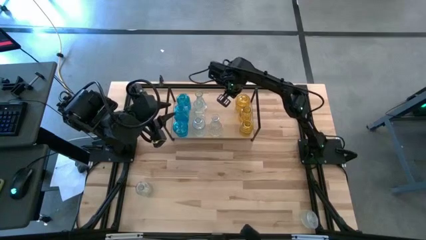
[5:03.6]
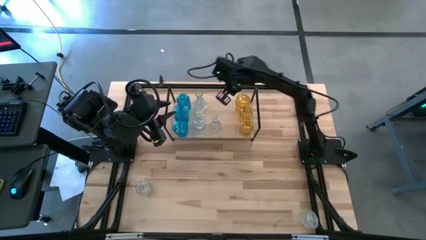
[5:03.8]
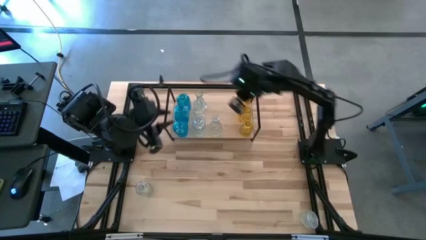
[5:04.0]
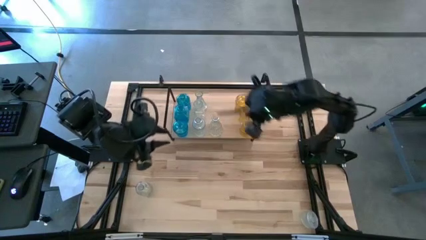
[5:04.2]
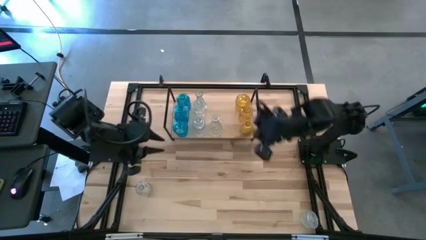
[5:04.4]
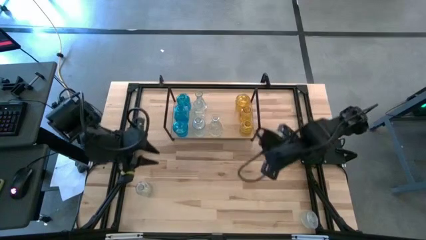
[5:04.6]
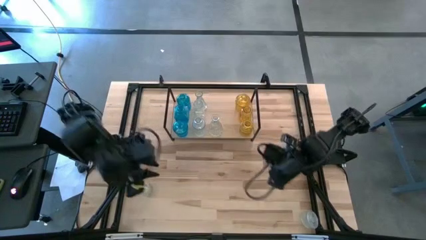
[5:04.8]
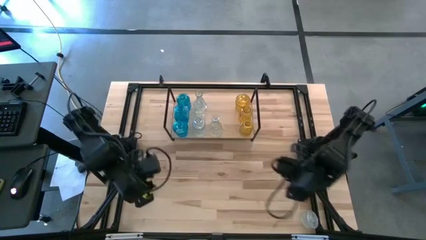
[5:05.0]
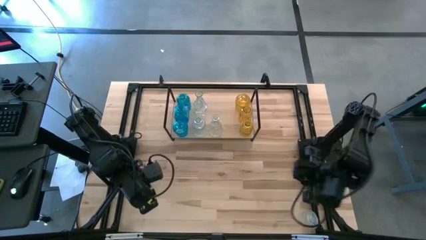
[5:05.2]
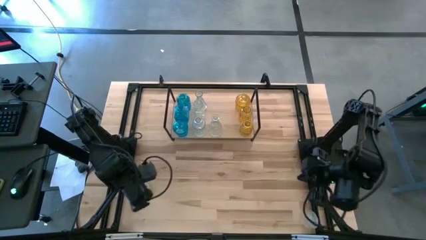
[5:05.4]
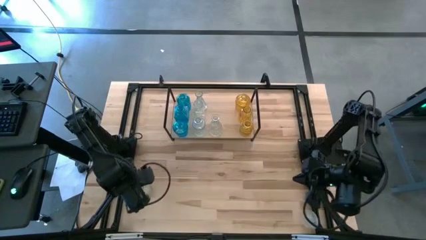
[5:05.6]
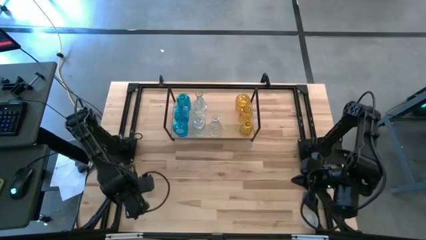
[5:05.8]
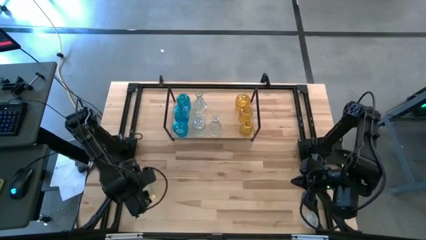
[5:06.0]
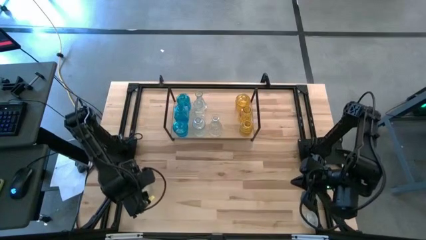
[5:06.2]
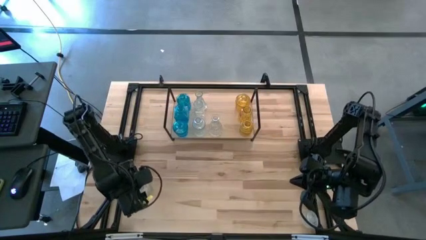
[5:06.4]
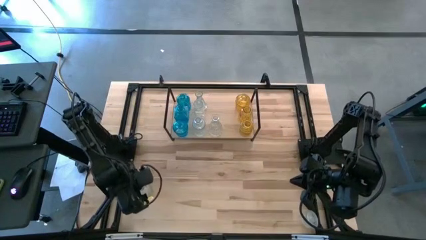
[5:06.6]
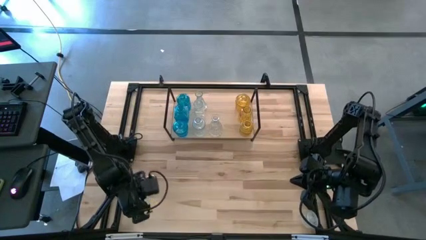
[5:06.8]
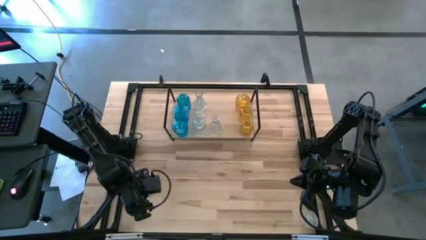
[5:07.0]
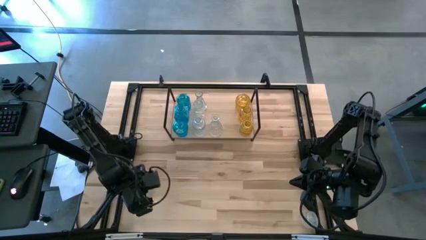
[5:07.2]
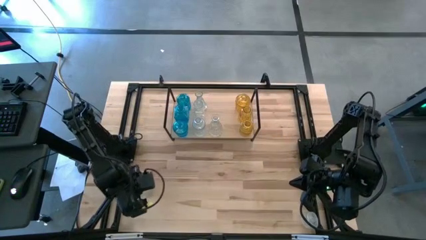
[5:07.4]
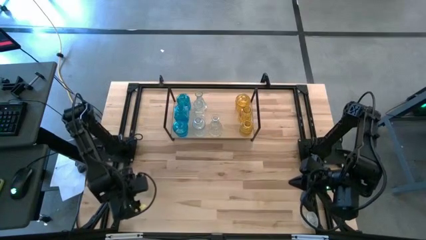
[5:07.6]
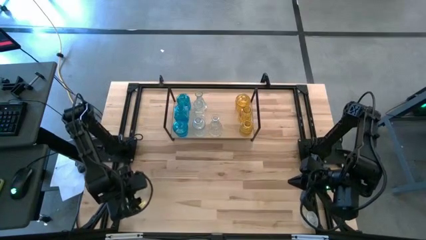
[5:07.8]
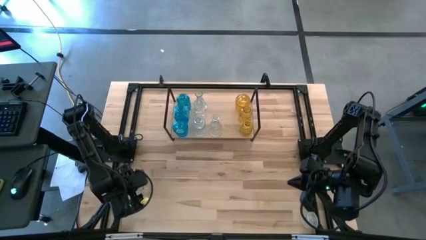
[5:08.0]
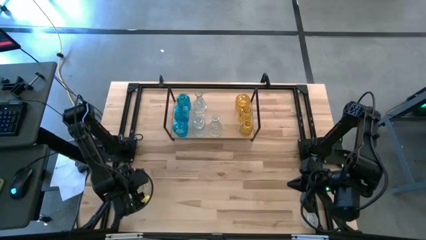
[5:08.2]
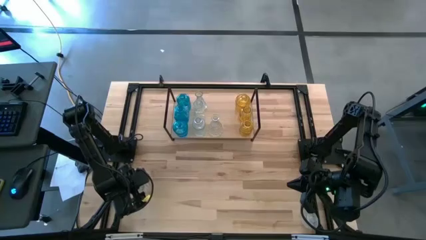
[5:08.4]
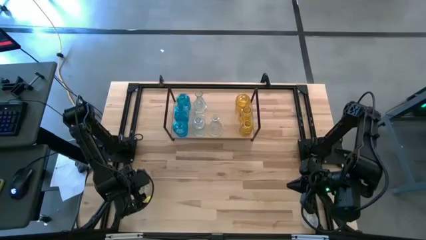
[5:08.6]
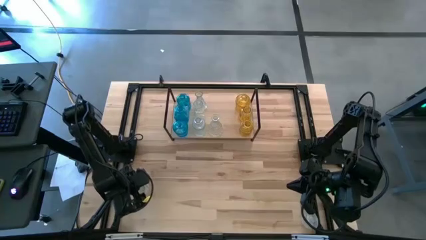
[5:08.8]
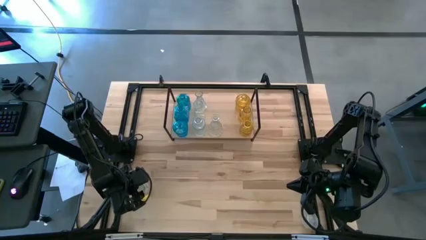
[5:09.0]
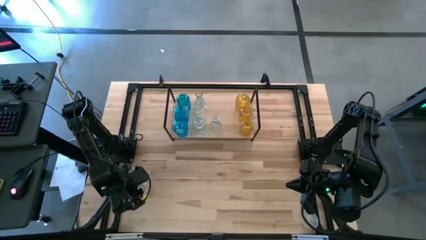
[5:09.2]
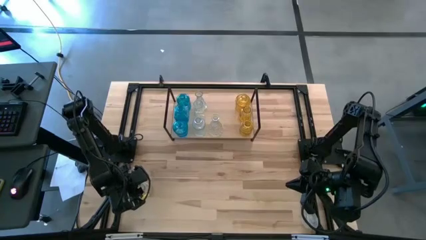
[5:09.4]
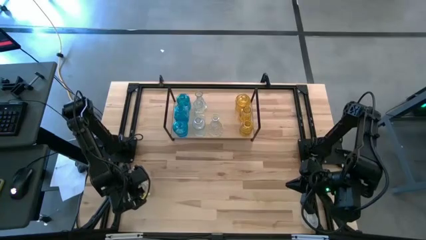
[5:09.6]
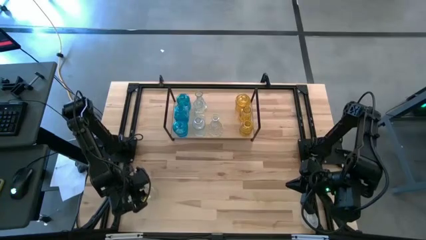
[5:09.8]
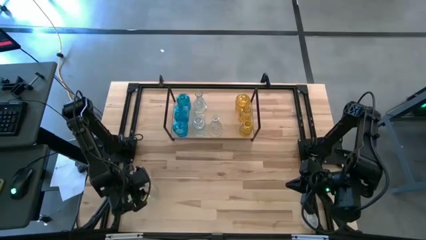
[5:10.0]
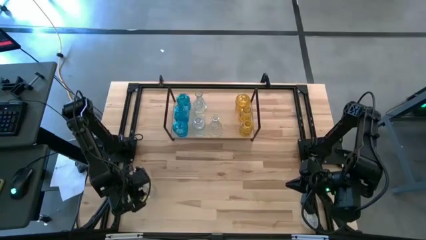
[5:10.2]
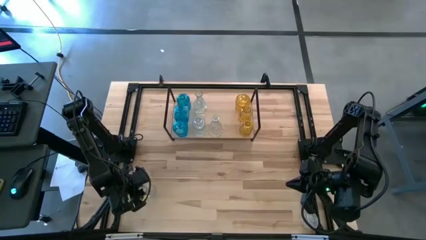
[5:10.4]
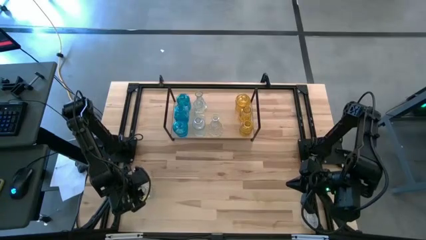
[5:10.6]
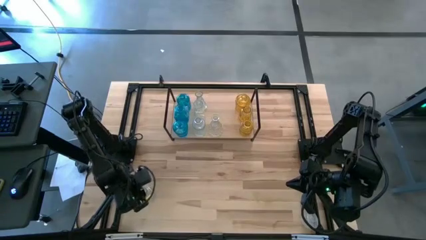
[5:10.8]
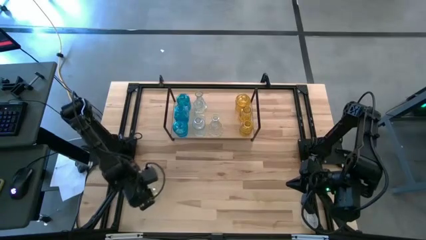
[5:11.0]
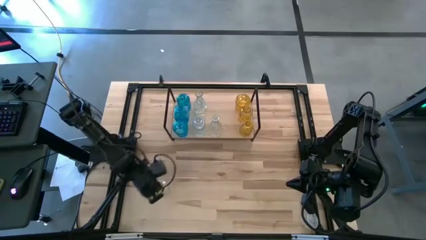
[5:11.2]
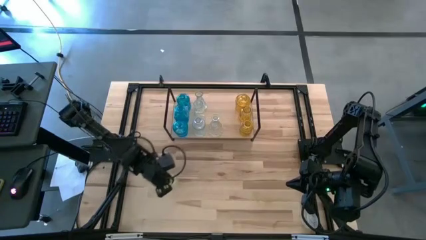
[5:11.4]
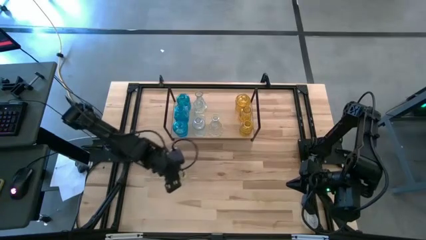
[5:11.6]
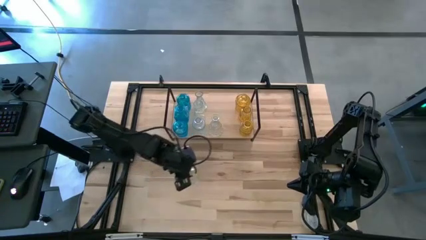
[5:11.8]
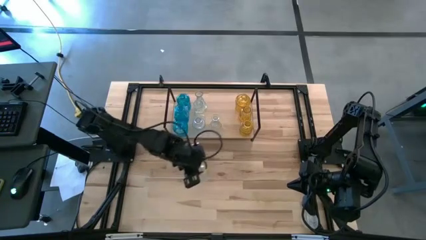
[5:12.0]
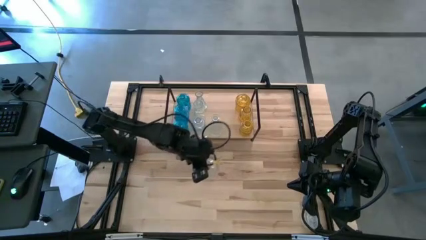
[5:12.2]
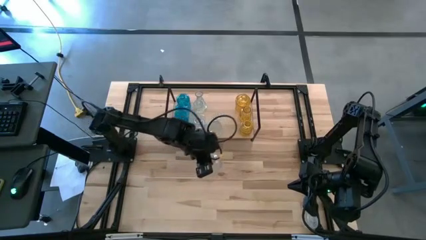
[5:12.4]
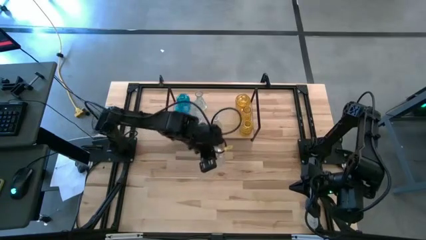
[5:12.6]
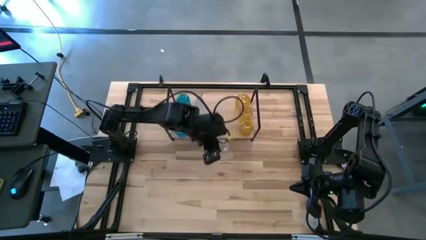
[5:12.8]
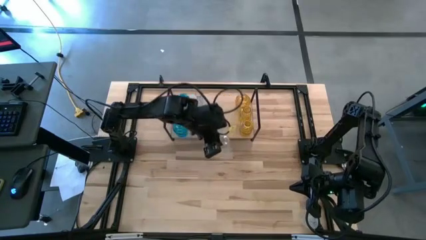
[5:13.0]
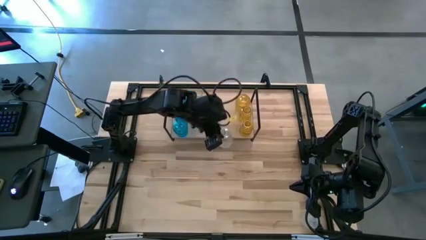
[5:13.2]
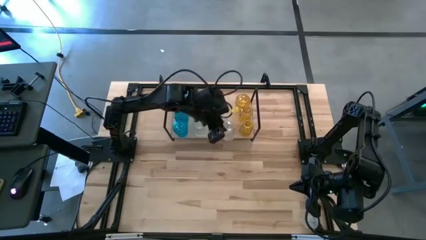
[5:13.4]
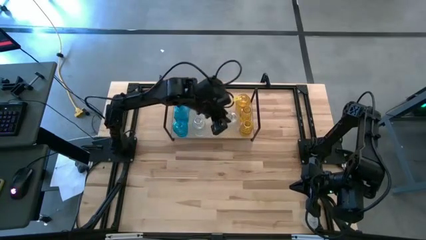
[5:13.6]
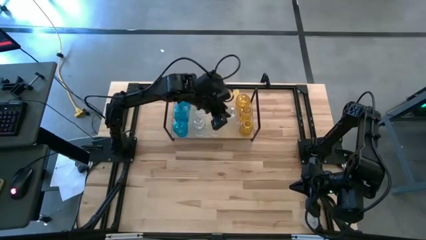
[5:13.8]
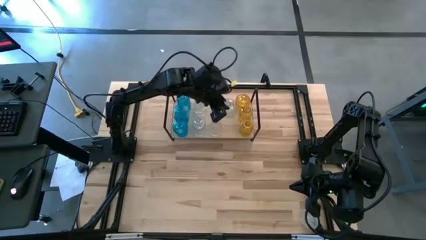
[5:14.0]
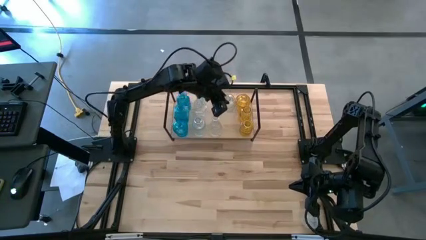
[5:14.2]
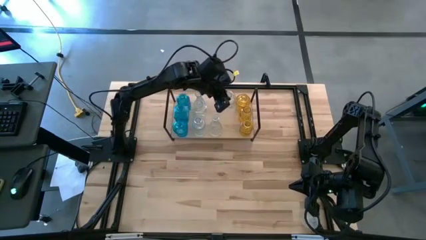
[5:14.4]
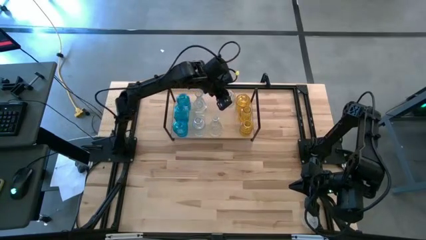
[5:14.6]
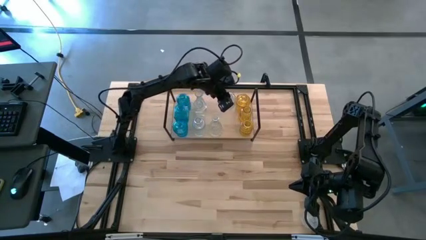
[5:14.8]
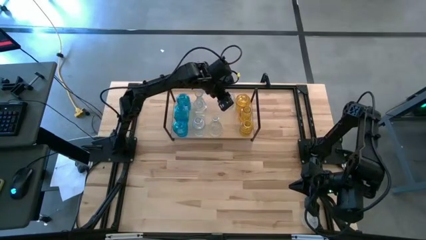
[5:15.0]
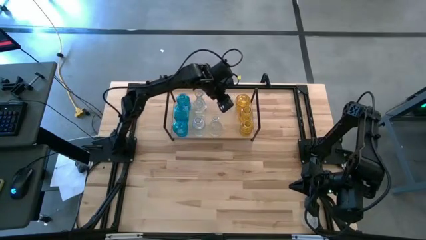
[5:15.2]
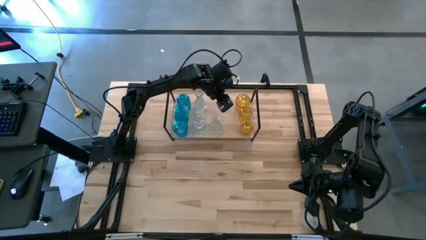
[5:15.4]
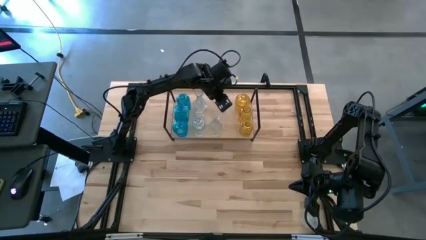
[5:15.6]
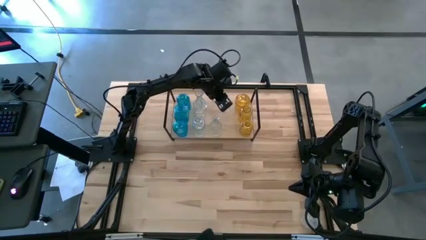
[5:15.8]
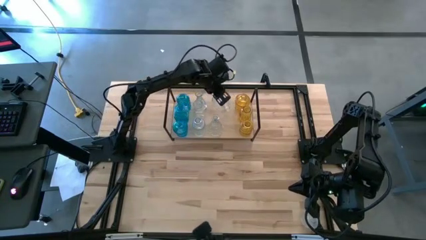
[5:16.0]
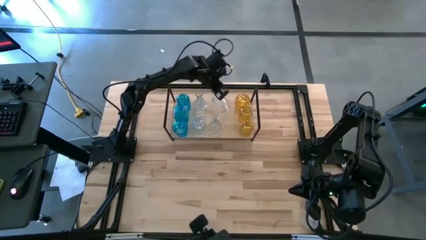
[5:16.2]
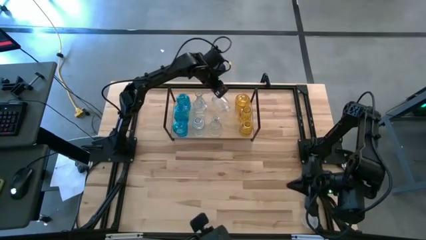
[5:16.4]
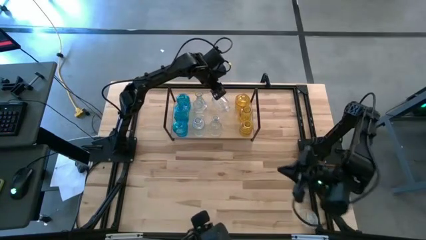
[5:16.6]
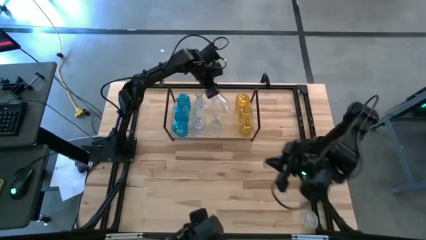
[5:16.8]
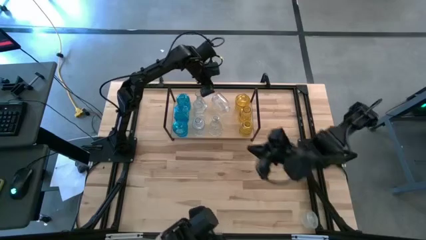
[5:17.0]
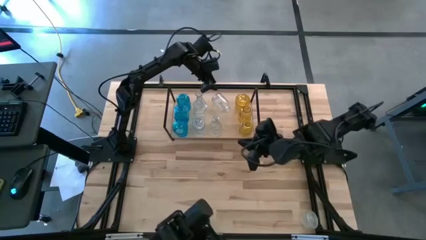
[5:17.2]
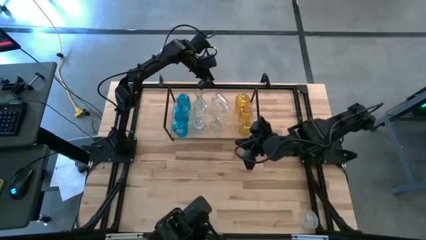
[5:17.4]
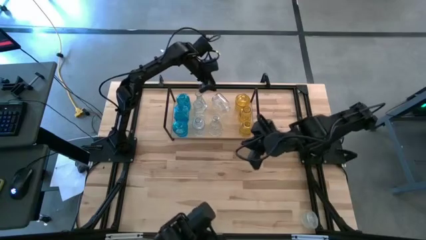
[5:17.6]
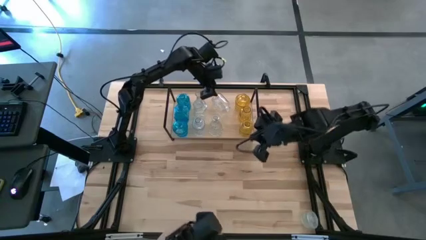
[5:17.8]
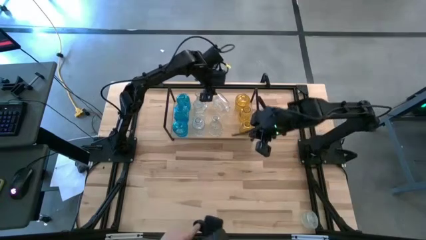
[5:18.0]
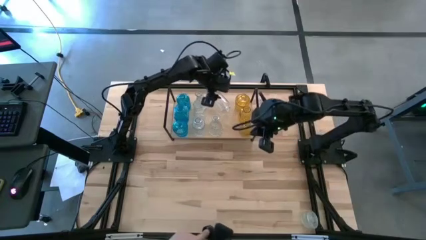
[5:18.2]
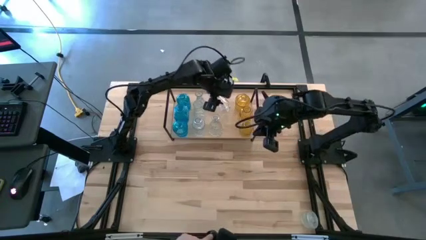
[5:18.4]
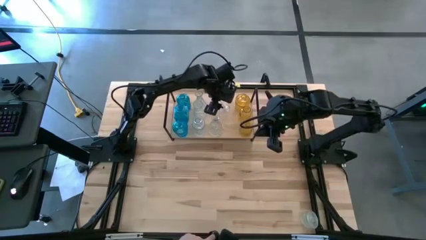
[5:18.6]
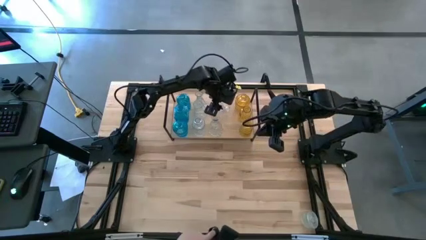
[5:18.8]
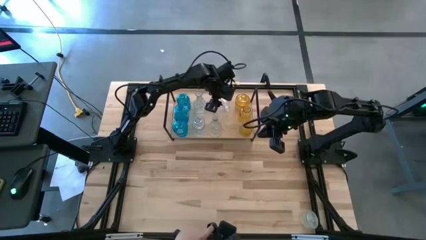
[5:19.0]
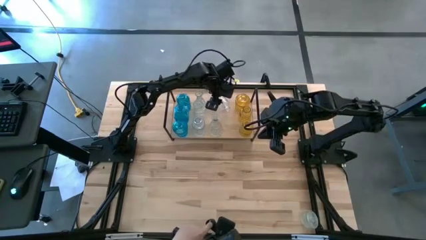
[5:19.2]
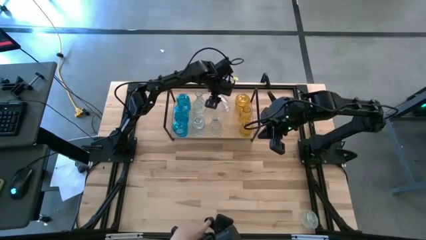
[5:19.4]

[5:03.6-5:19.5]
Task: sort vases onto shelf
Put the transparent vase on the shelf aligned with the other transparent vase
